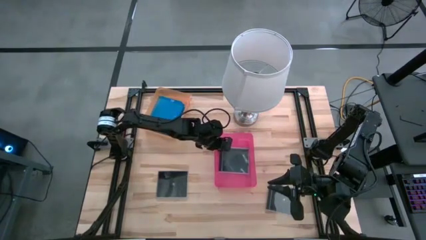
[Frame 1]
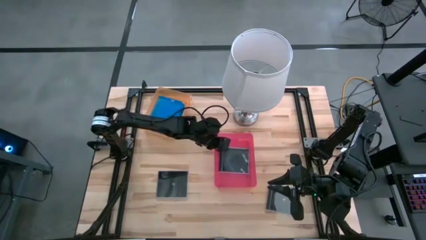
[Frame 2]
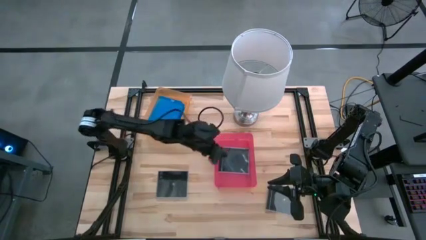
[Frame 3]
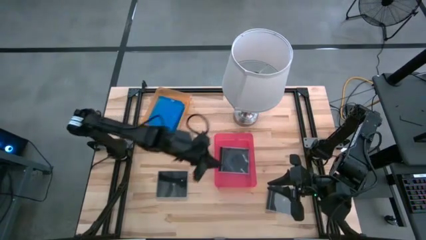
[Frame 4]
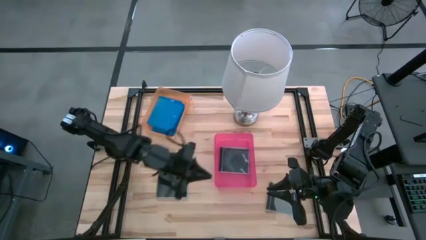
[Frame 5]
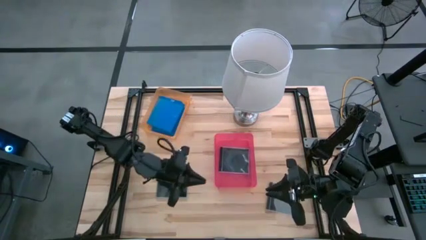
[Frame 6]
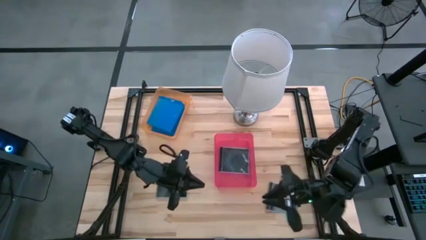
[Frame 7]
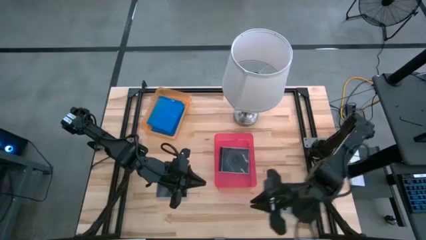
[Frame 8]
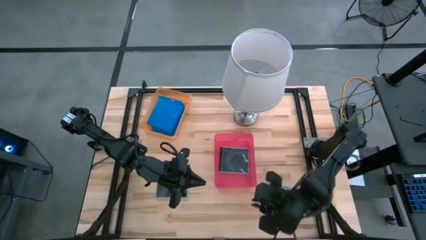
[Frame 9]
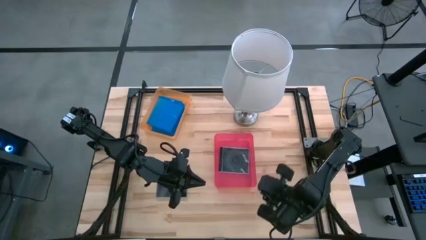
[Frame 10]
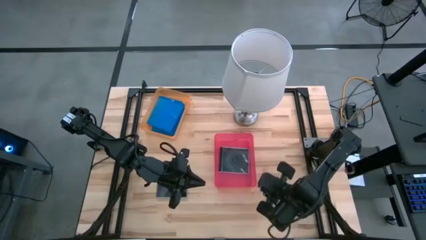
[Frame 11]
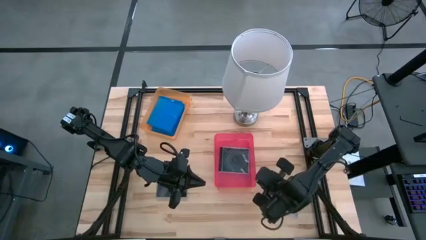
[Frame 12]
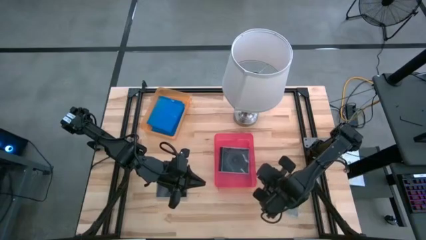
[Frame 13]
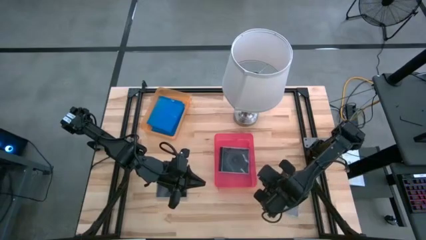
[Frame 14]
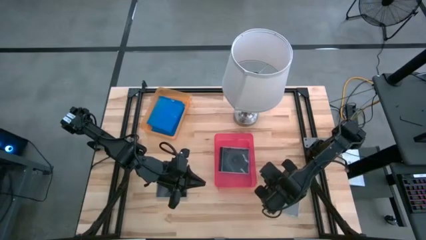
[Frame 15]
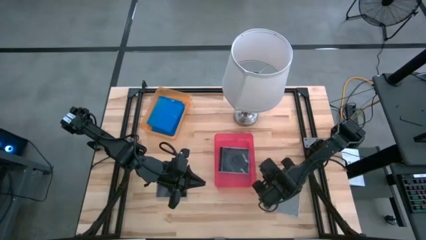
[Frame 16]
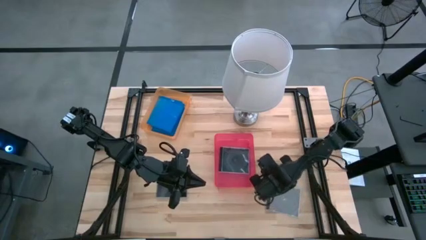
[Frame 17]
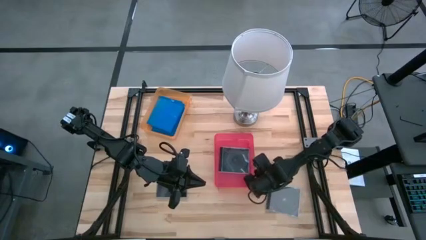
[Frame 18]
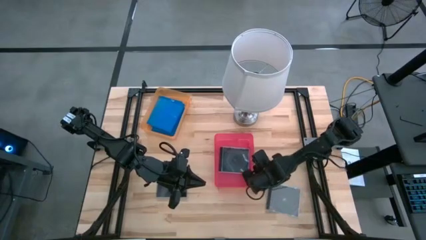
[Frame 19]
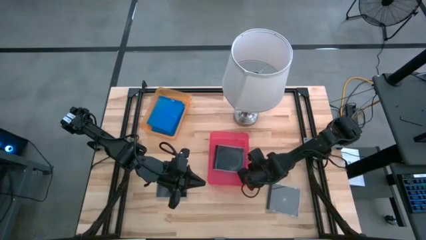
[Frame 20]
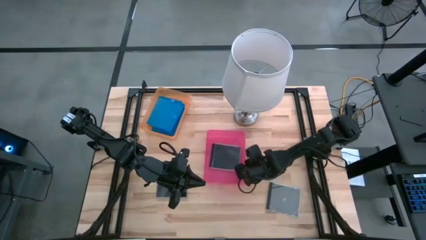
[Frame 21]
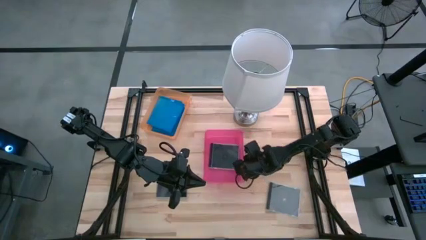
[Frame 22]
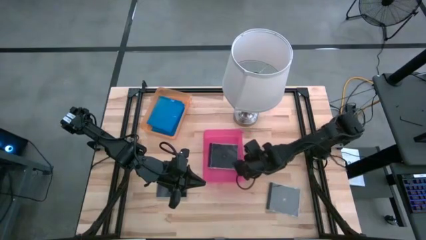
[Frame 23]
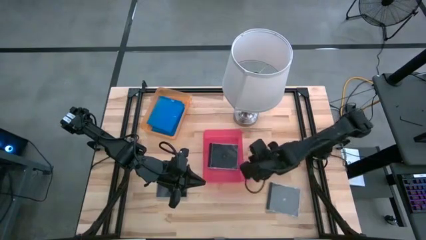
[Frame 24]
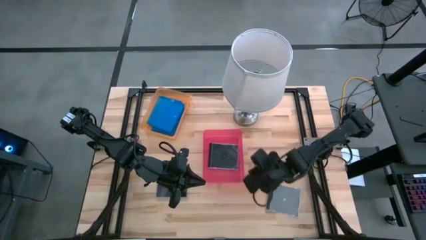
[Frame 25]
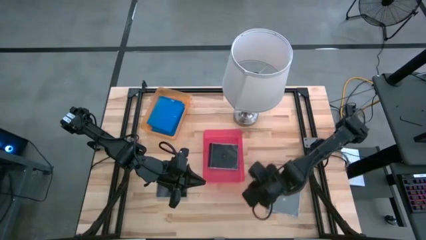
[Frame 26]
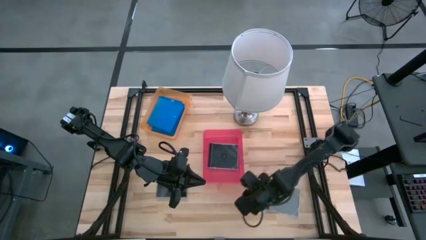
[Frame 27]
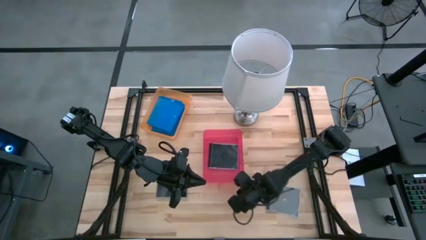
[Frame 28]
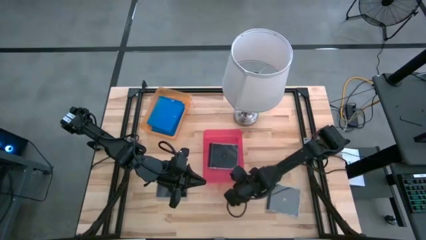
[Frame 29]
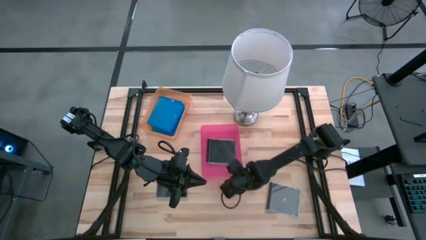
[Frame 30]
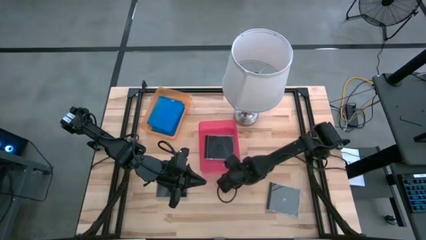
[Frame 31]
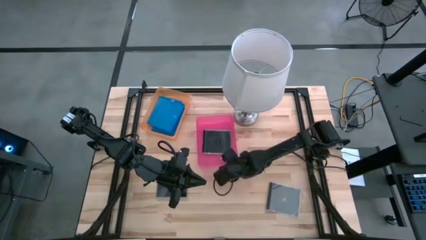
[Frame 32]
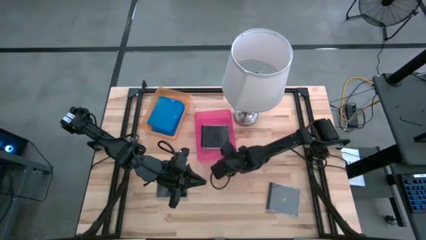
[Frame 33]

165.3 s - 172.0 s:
Task: Pick & place jewel cases by type
Adjust the pink bin

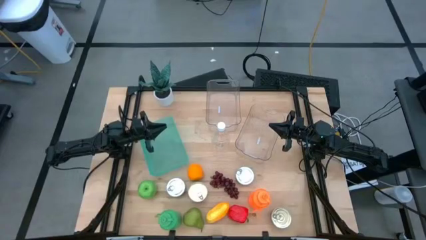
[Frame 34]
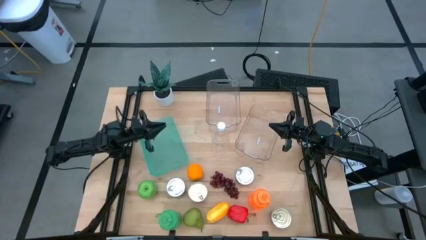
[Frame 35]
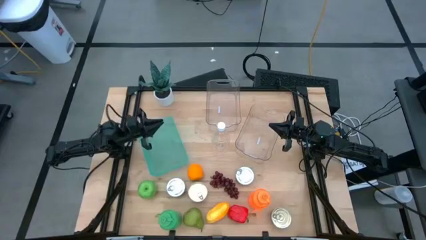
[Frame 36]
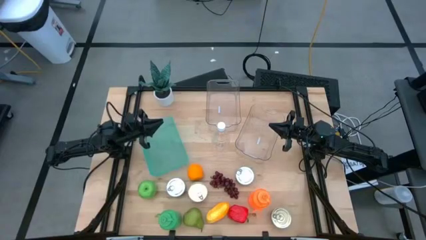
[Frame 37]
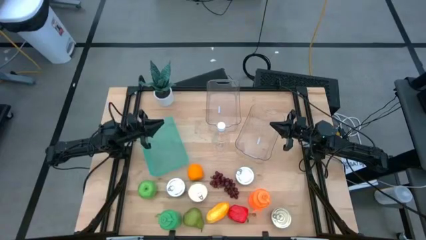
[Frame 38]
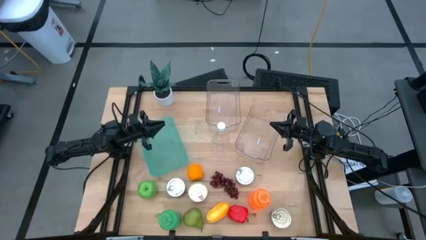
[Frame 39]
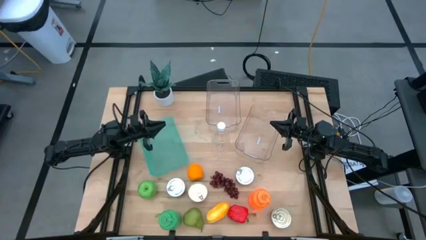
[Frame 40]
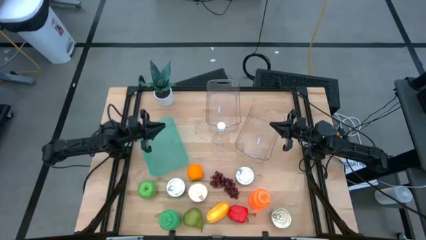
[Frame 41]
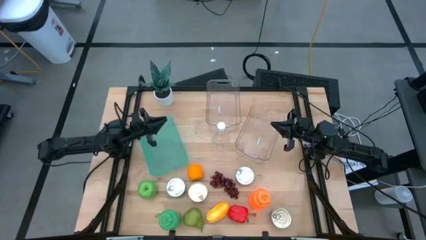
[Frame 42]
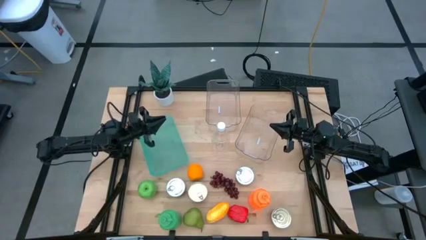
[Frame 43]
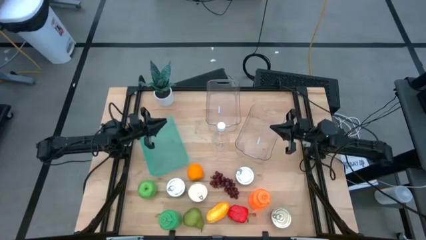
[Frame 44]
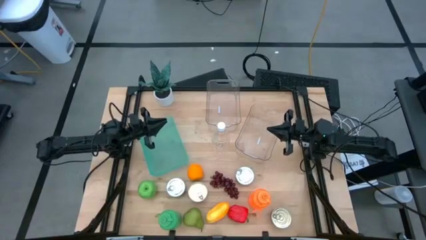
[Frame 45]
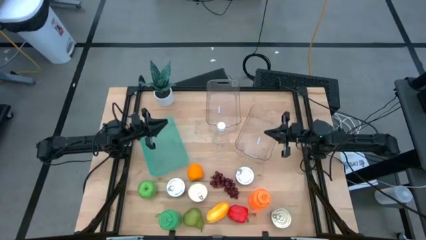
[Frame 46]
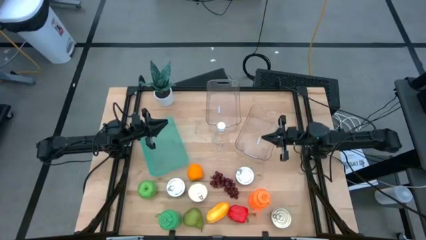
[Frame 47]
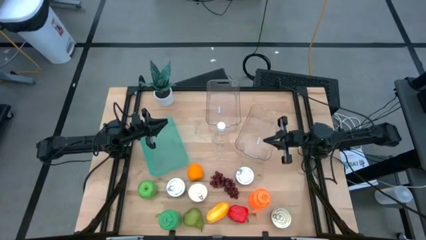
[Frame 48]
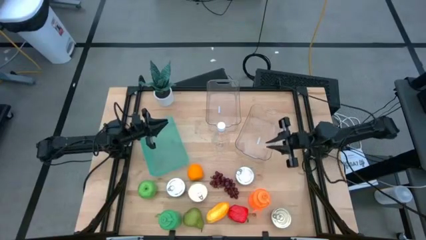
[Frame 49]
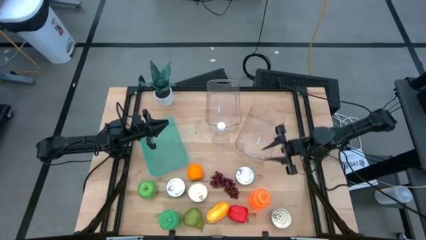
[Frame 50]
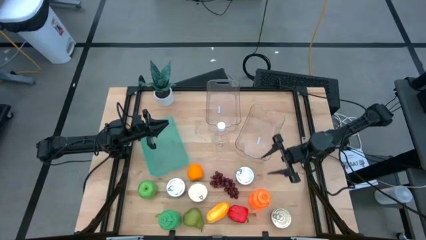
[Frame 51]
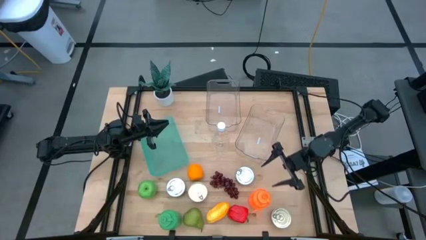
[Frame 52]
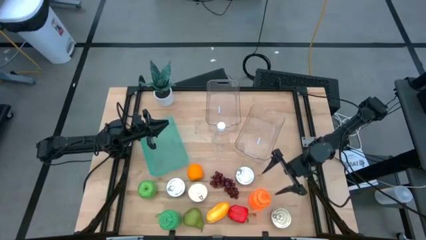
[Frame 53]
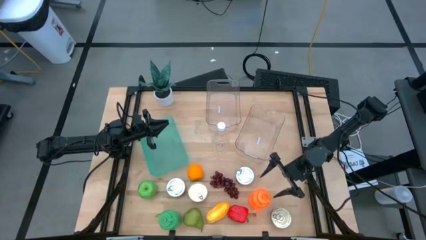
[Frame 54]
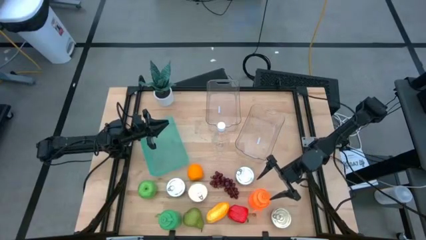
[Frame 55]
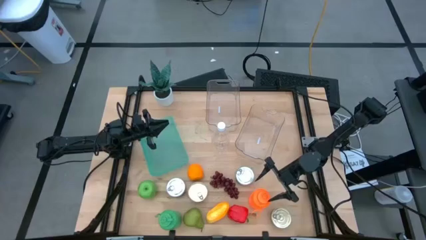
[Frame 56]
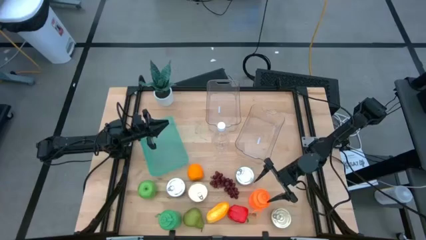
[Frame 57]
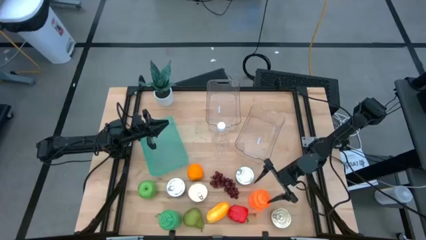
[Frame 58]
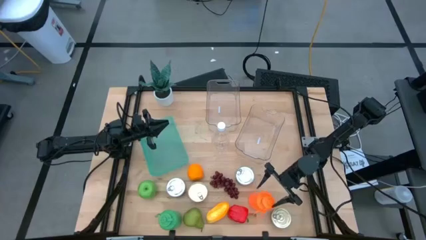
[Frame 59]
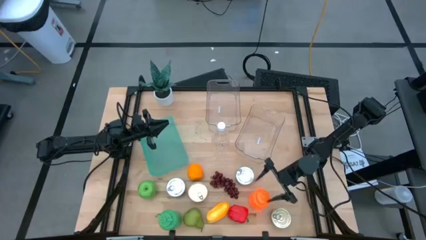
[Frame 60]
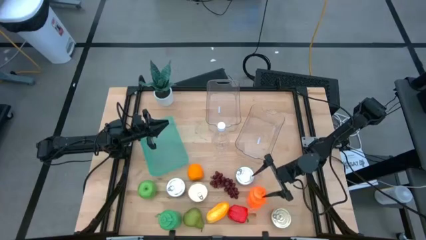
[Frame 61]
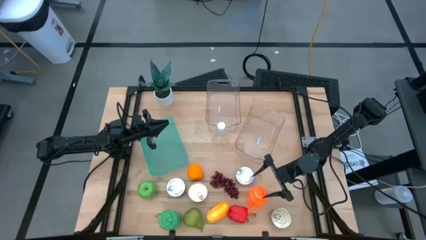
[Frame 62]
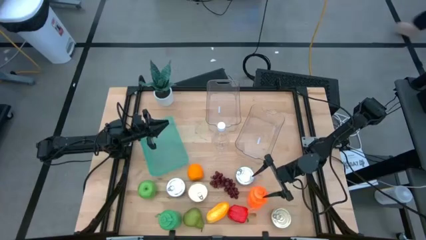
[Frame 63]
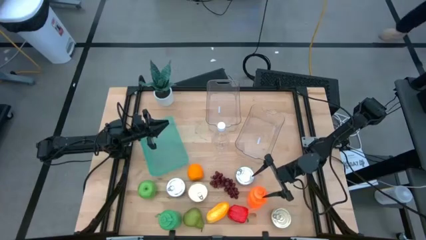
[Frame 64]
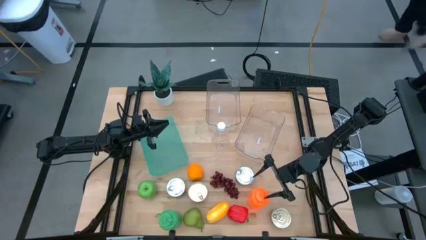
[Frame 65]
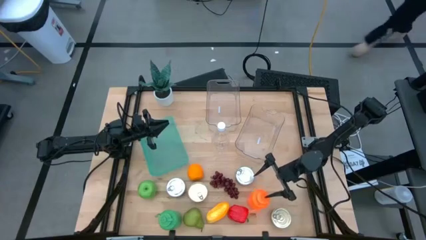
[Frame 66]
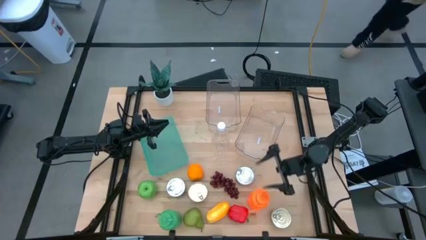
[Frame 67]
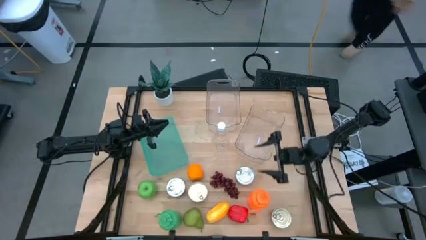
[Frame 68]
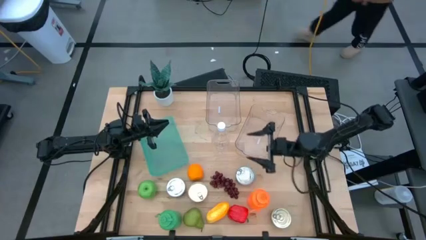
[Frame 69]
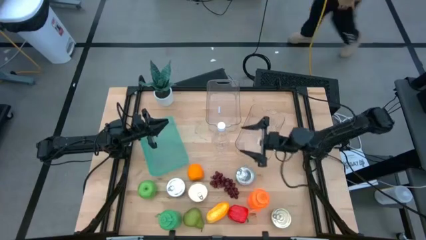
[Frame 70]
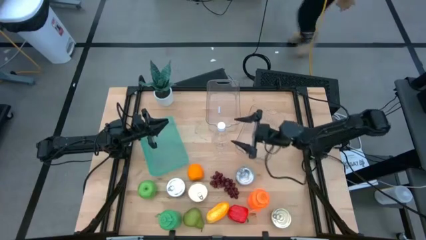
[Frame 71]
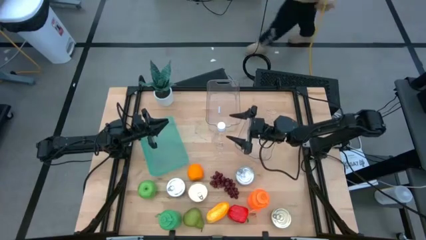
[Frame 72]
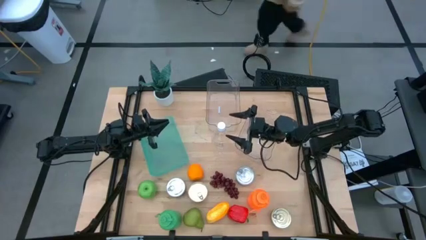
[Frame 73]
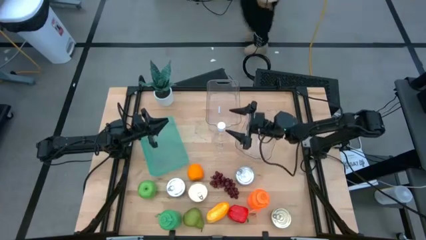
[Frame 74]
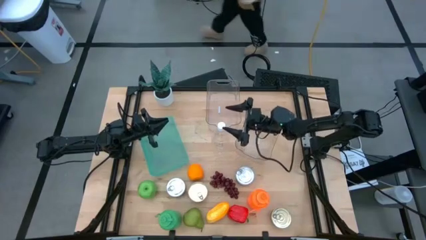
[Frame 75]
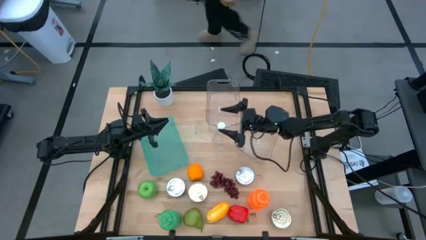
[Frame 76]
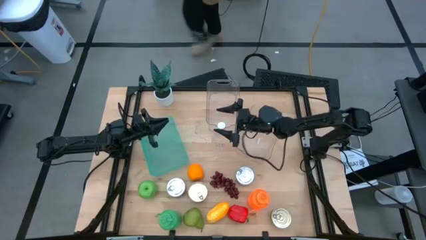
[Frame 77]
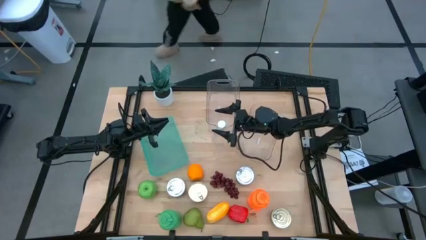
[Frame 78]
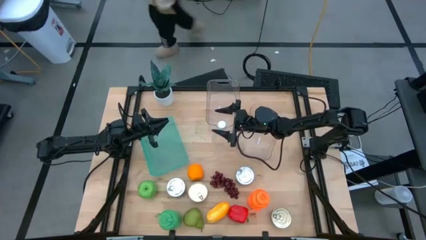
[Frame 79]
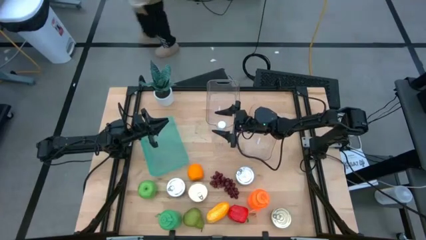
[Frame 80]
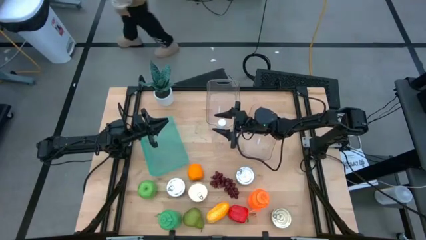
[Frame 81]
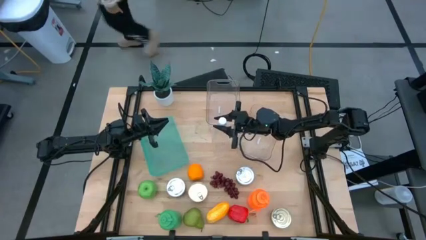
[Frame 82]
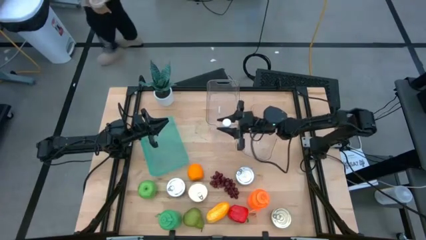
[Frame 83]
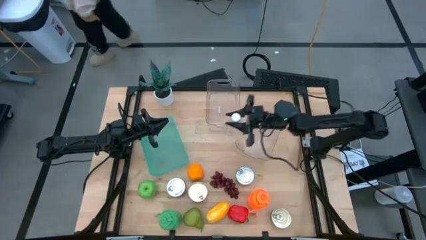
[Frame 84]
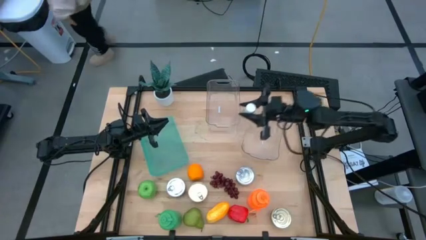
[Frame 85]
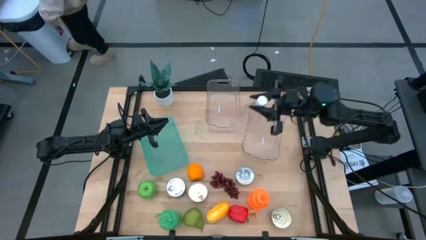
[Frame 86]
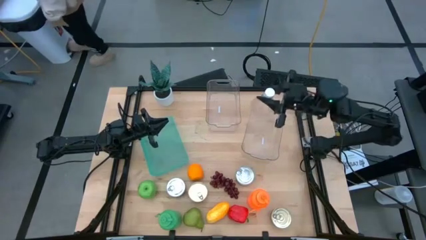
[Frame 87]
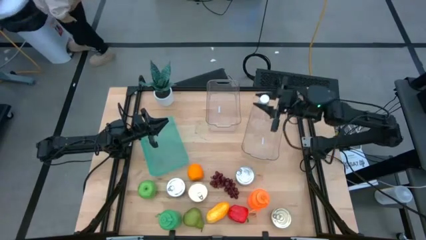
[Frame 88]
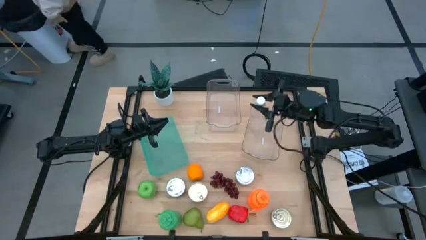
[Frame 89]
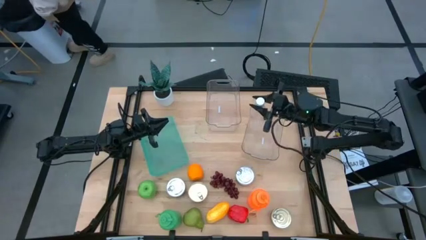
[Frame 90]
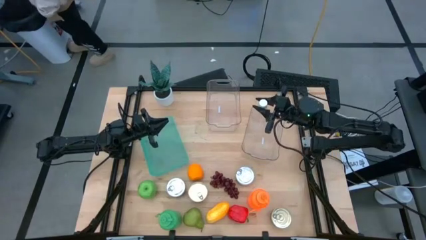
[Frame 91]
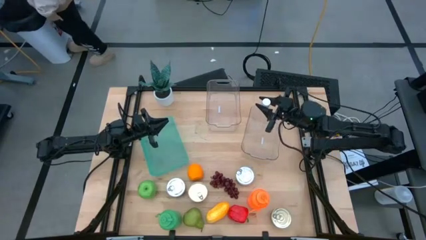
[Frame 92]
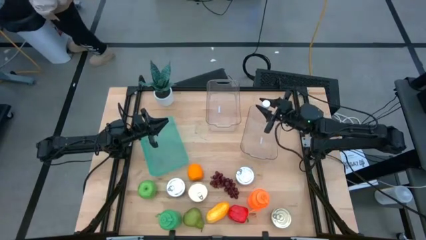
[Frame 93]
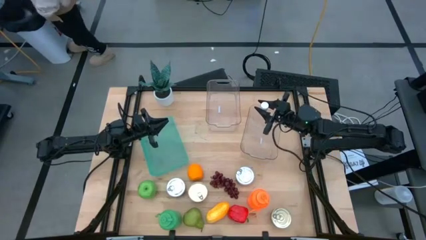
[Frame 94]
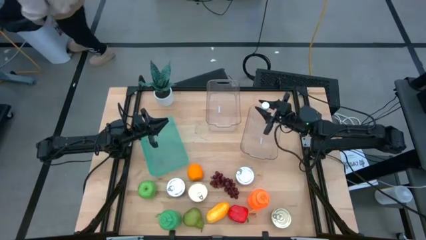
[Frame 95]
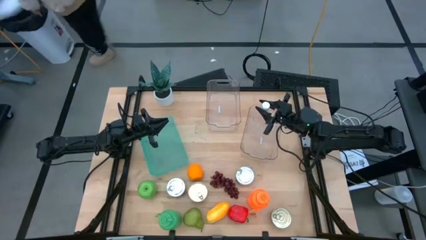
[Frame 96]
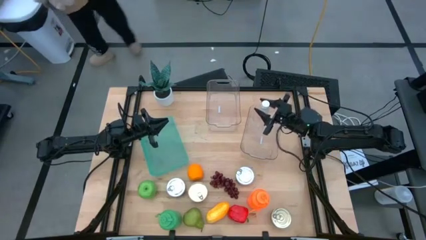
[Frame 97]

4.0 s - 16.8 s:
Task: Pick & Place Food Item
Put the transparent water bottle into the right transparent bin
